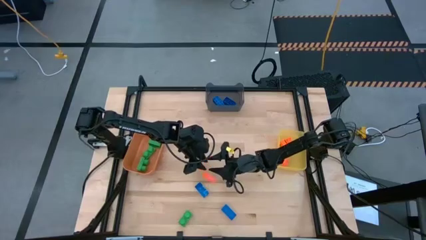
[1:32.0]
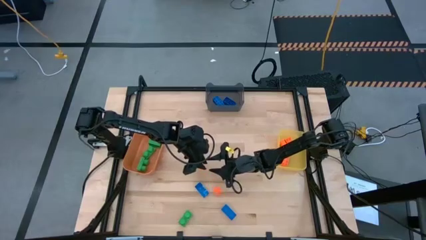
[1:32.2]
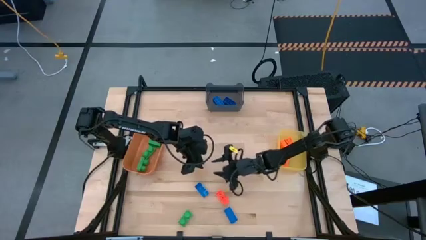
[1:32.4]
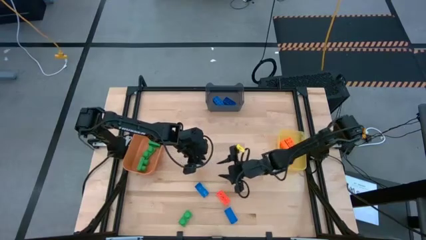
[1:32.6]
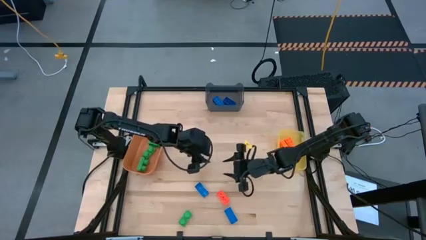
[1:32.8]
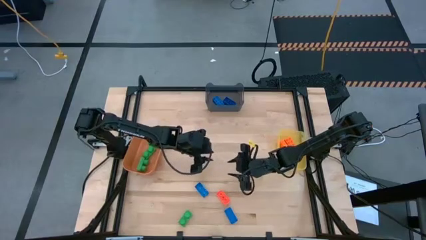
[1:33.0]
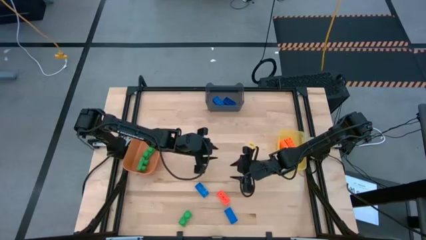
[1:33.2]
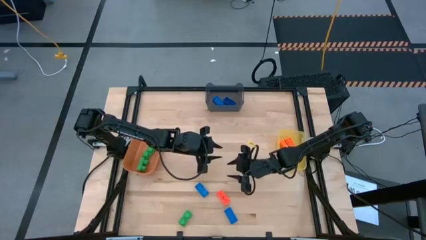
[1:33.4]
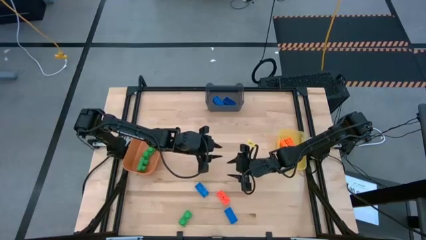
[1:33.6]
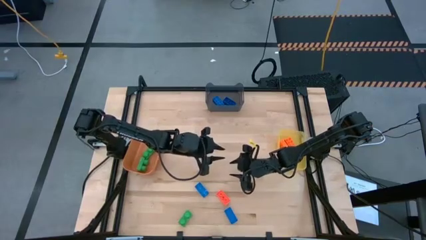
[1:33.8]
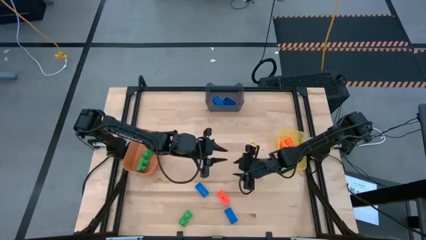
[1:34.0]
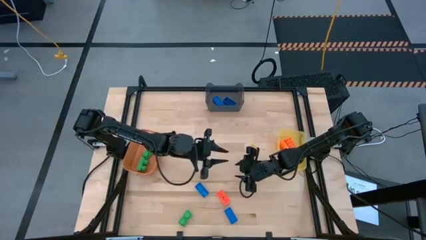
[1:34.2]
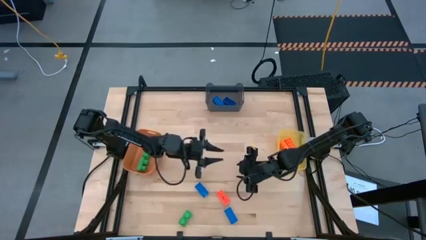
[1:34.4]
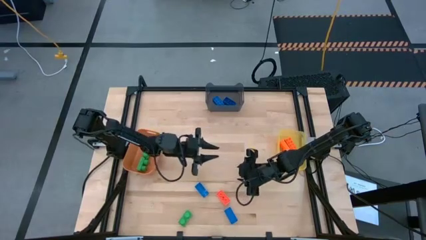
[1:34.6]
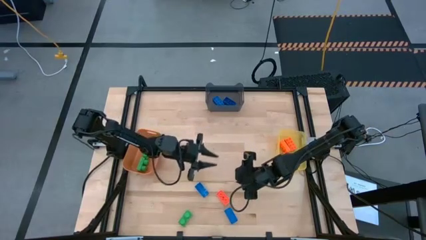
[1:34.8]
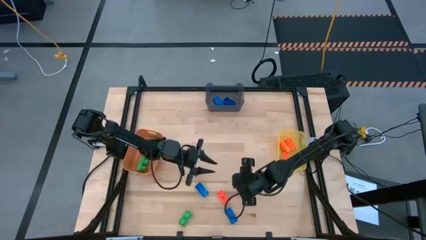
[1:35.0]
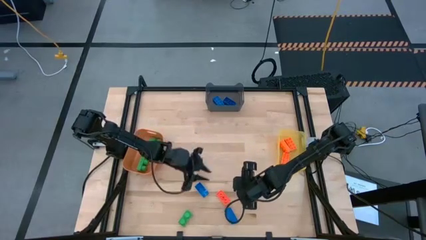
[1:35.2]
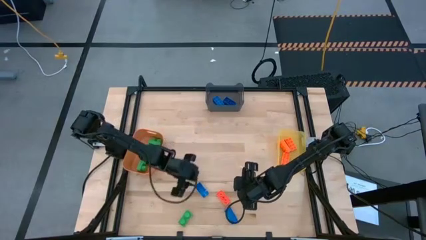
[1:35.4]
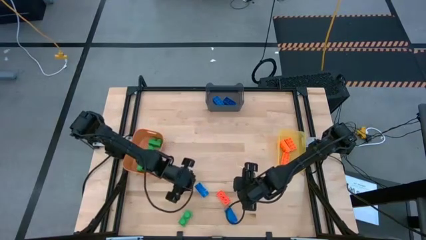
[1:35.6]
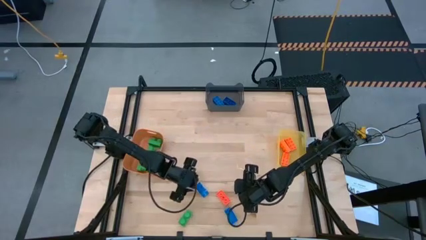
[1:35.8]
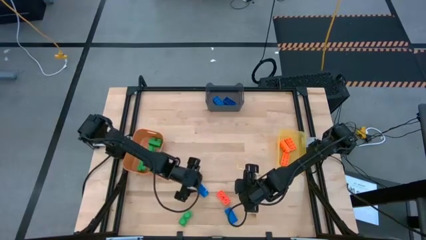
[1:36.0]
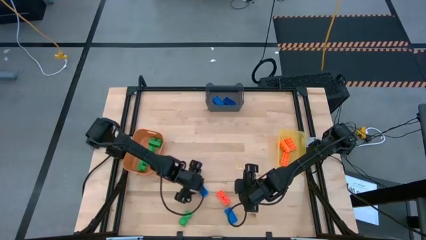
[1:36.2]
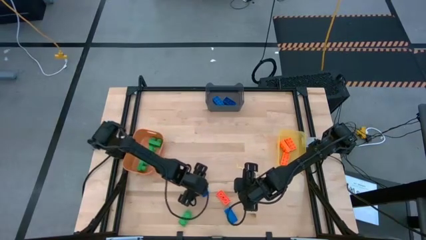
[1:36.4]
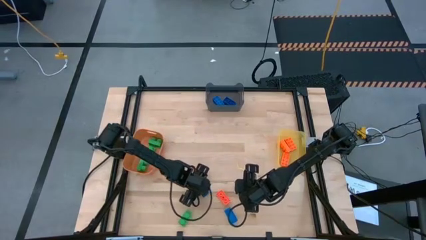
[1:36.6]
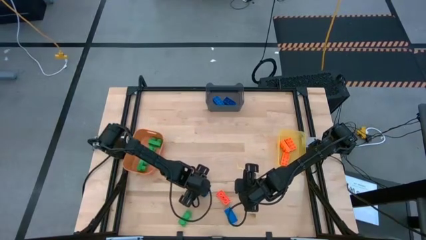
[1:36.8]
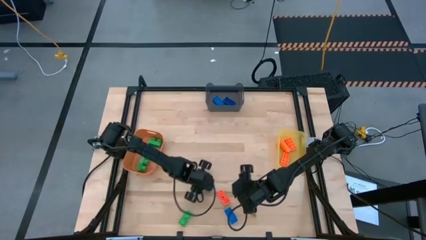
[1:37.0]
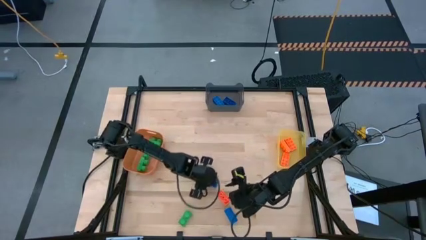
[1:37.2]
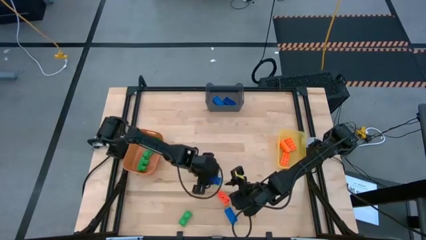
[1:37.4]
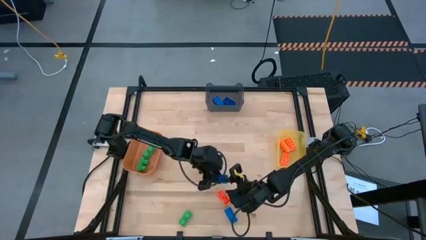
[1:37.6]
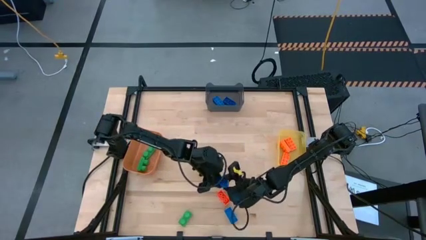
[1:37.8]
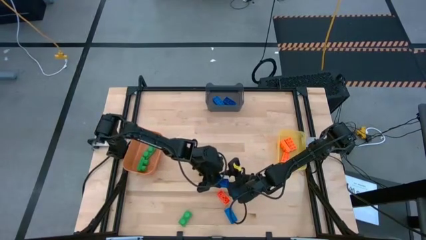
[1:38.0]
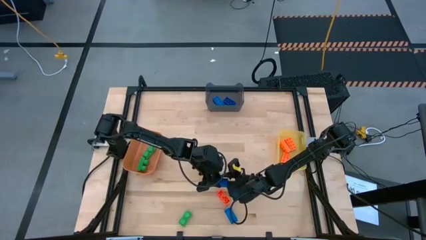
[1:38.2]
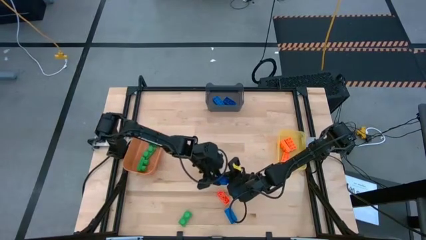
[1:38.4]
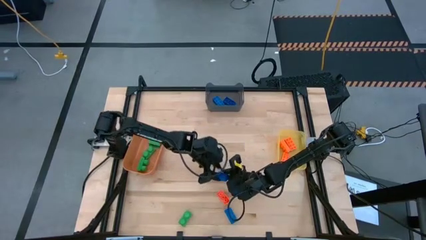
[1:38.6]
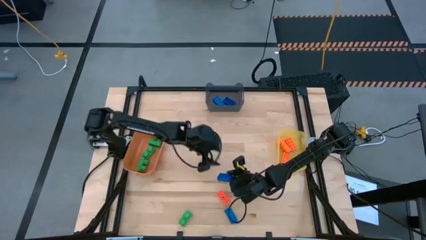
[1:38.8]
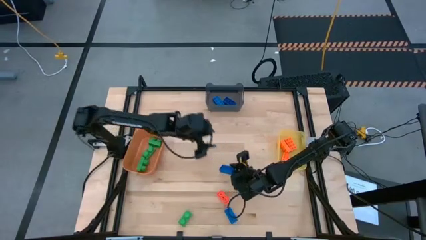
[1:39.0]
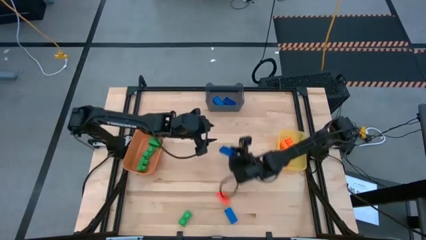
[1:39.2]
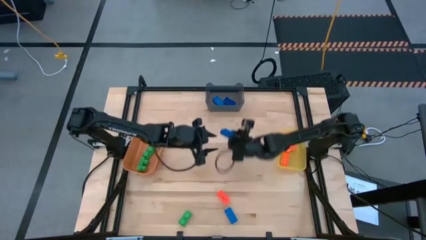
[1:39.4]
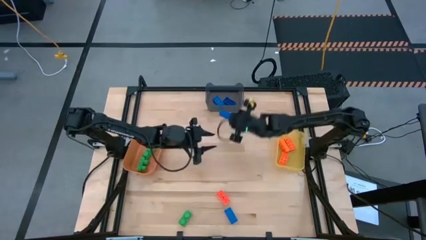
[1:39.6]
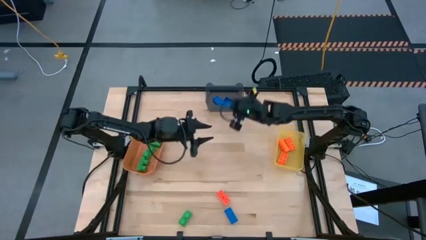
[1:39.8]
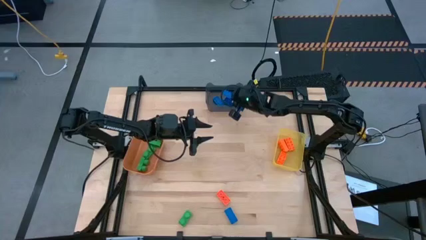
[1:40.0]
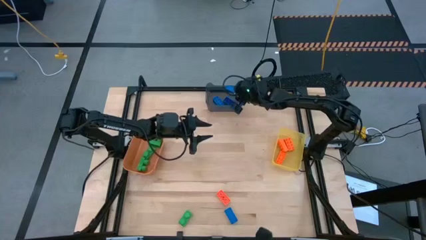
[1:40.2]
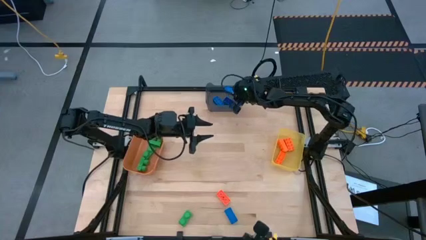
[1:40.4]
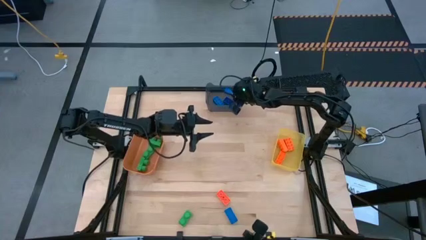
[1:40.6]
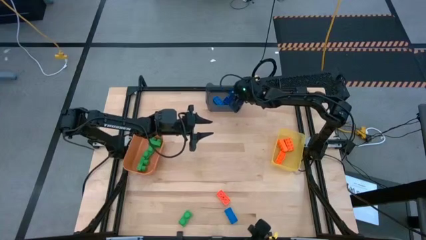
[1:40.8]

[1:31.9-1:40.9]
Task: Sort & place blocks by color
Put the blue game piece into the black bin

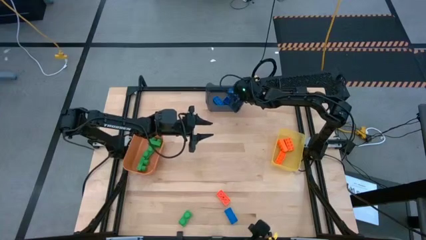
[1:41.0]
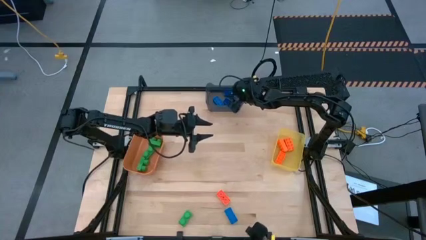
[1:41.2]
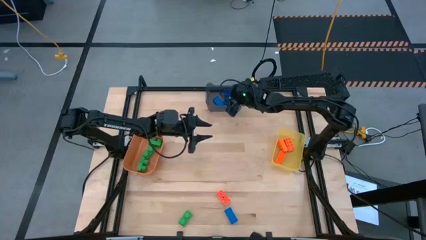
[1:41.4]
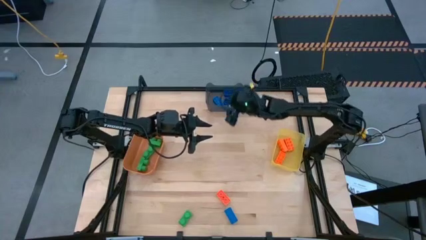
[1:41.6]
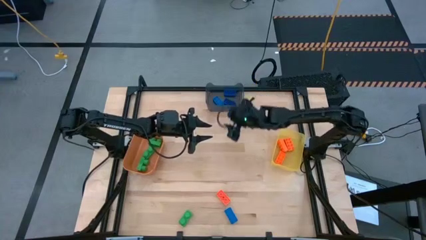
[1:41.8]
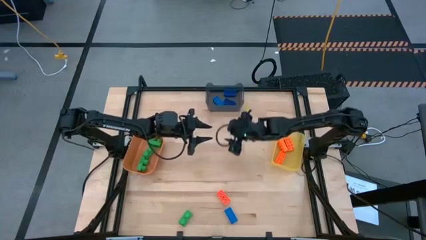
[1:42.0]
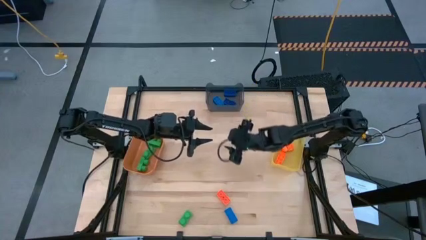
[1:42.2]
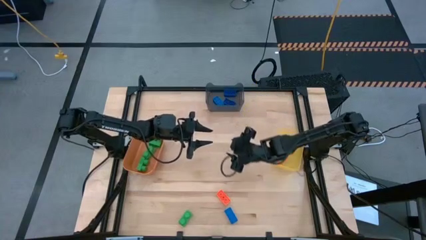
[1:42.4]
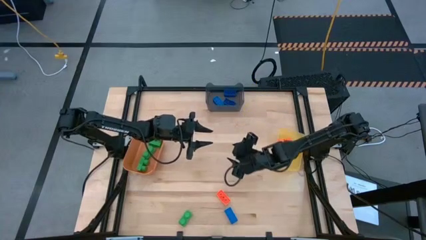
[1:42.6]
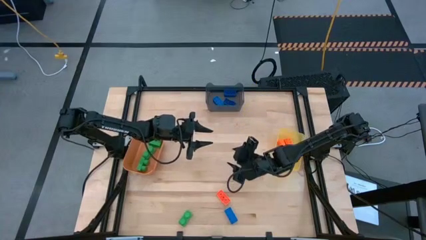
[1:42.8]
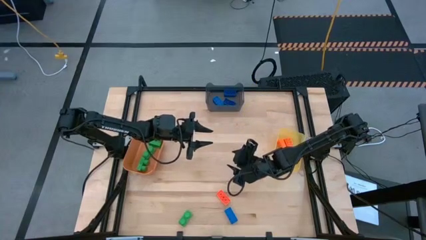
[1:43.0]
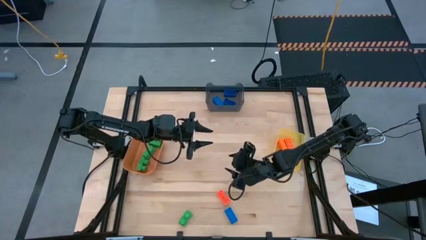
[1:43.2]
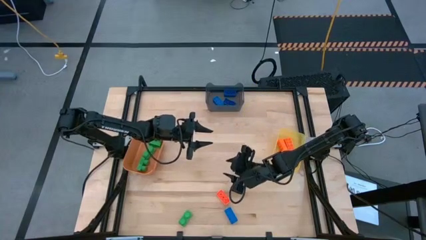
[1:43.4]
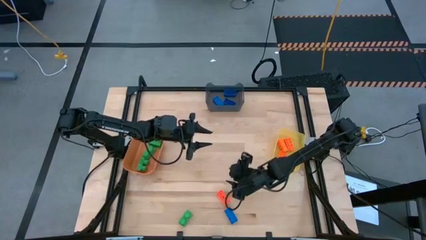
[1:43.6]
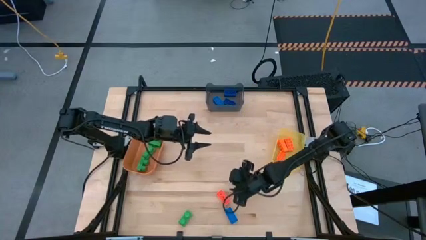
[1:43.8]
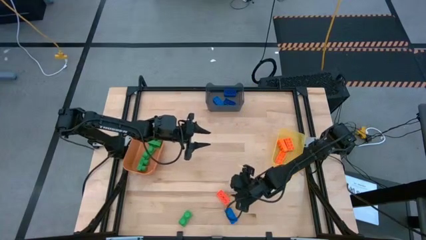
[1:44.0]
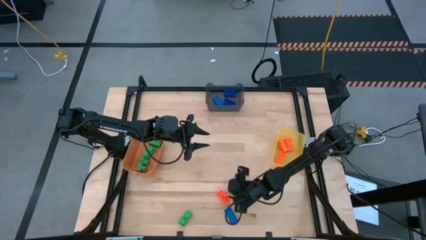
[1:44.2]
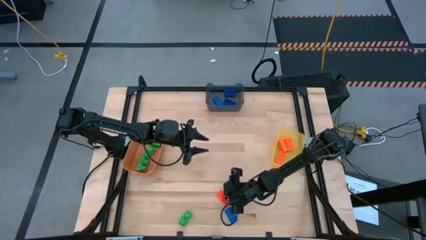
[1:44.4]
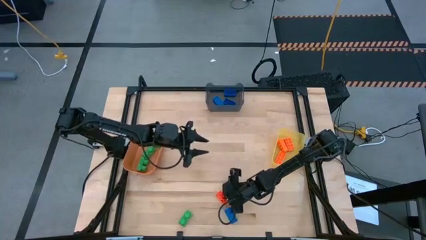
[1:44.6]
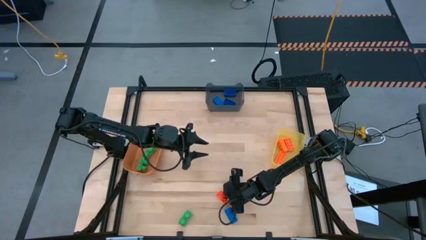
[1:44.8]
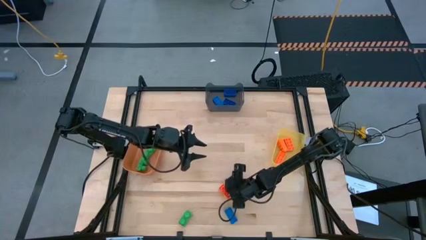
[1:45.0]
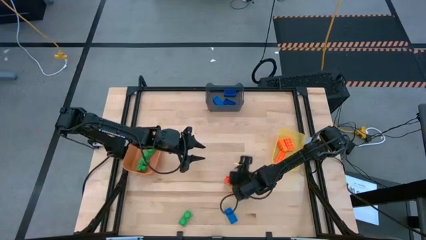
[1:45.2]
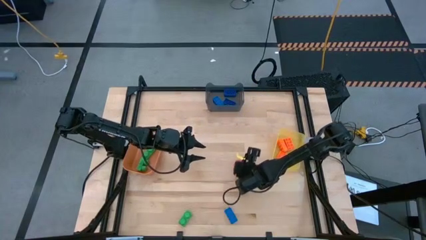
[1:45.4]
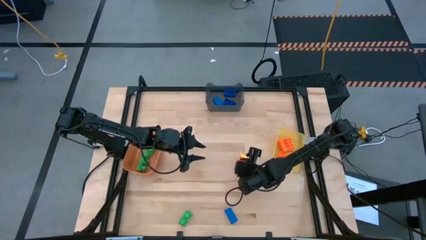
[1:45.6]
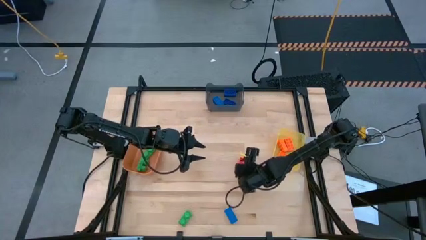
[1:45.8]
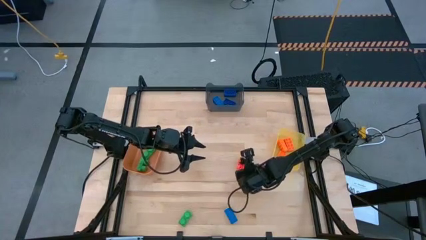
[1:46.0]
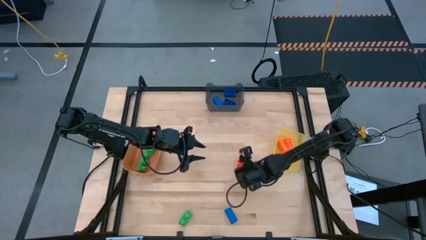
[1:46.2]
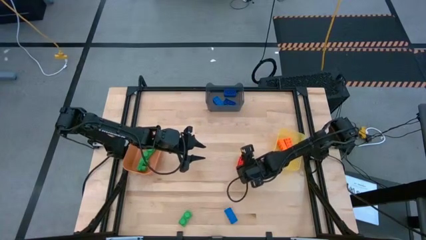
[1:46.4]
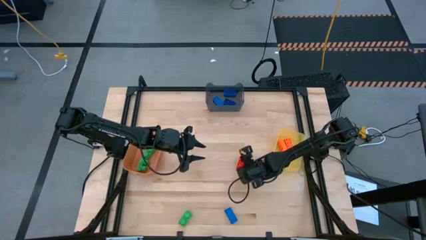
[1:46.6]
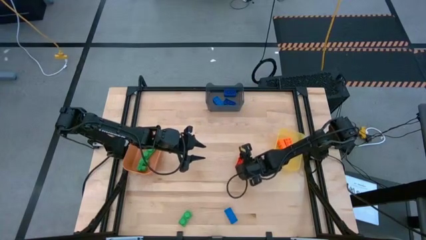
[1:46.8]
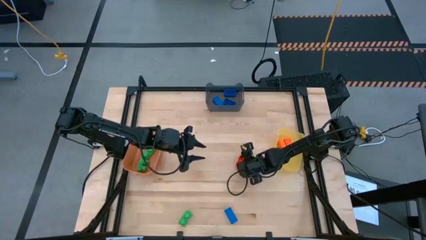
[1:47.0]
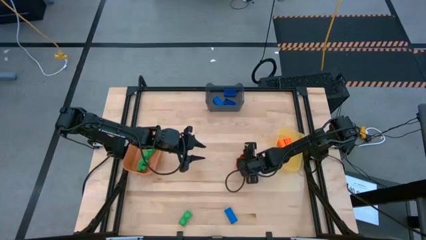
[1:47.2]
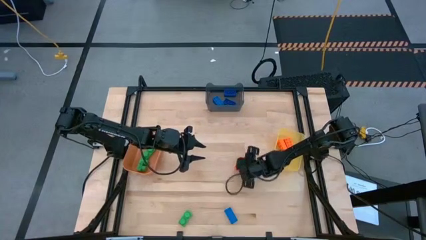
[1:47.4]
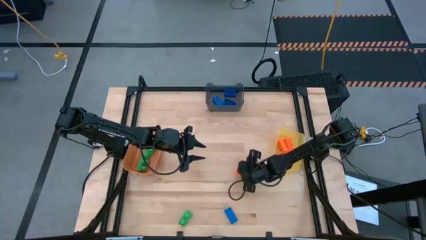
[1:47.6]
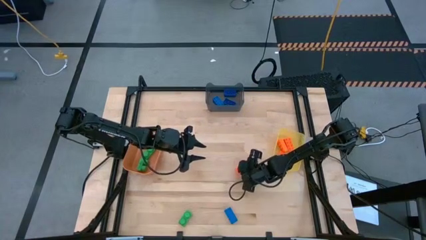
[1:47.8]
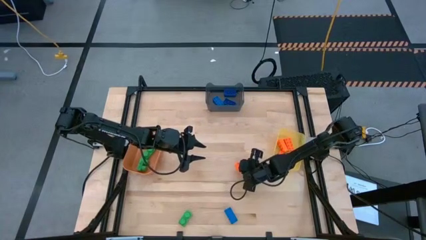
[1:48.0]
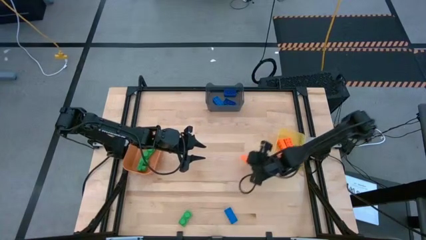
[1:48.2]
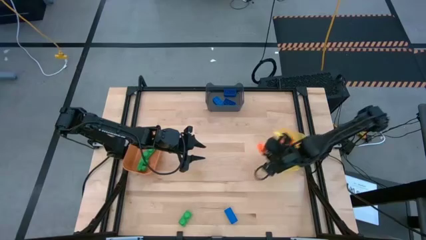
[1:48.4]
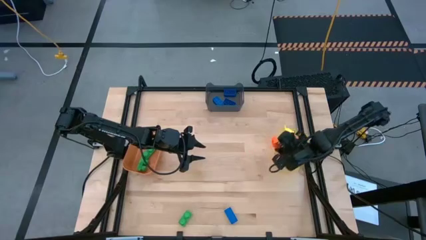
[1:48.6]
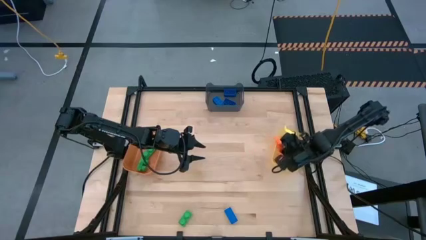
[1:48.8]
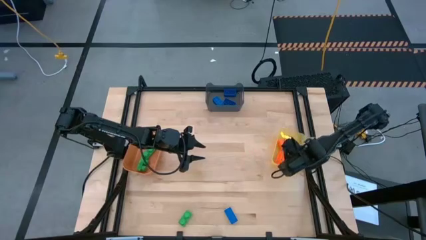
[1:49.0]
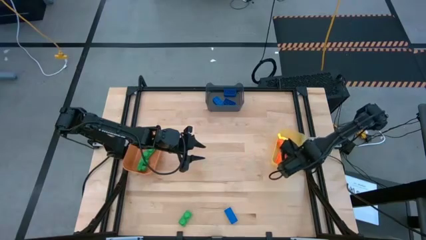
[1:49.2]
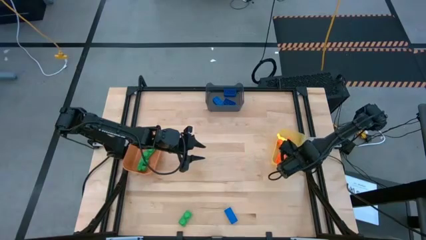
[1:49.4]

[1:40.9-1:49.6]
Put the orange game piece into the yellow bin
